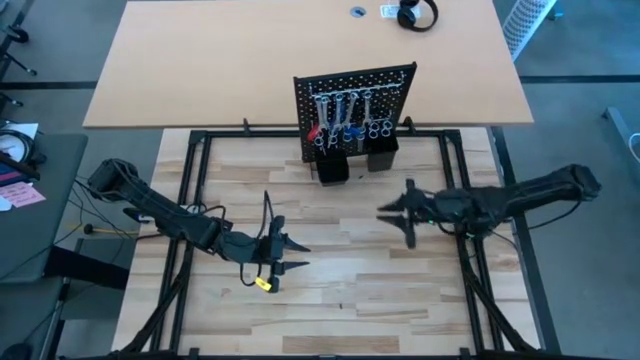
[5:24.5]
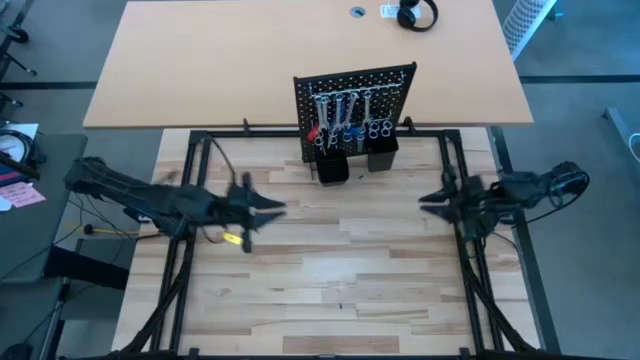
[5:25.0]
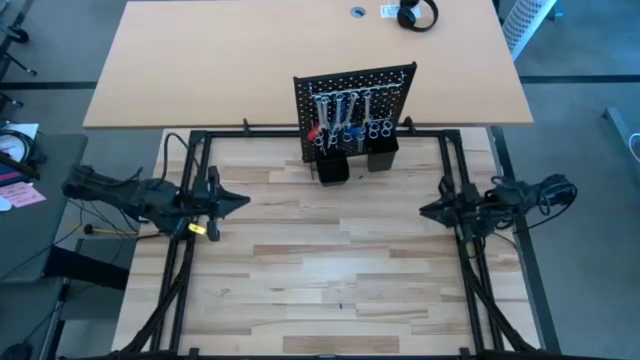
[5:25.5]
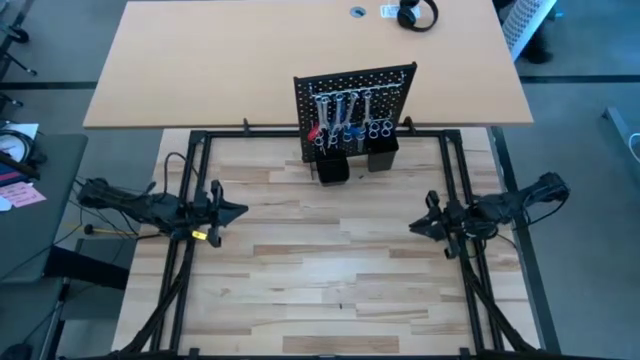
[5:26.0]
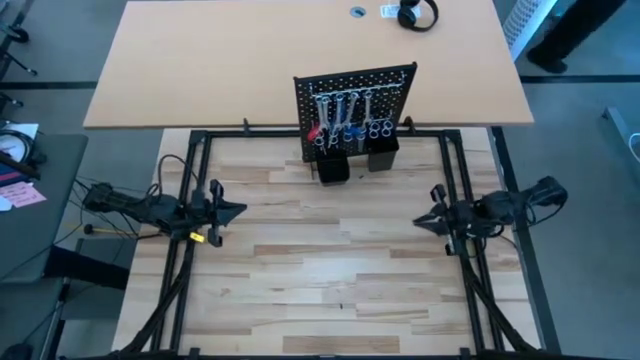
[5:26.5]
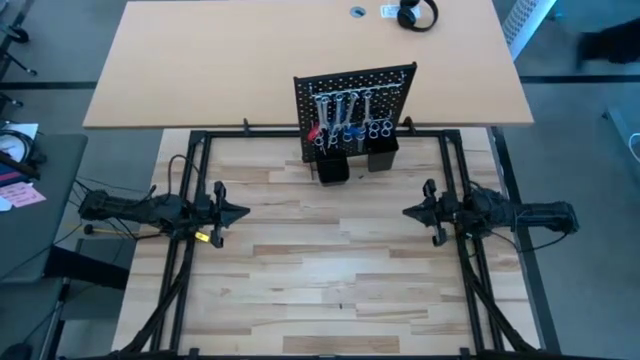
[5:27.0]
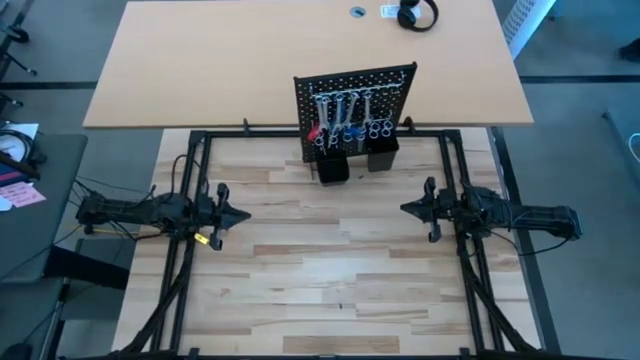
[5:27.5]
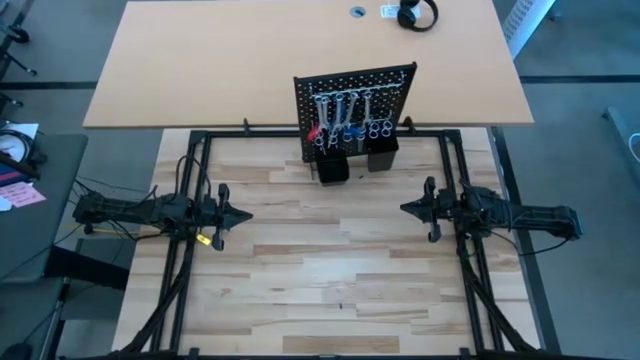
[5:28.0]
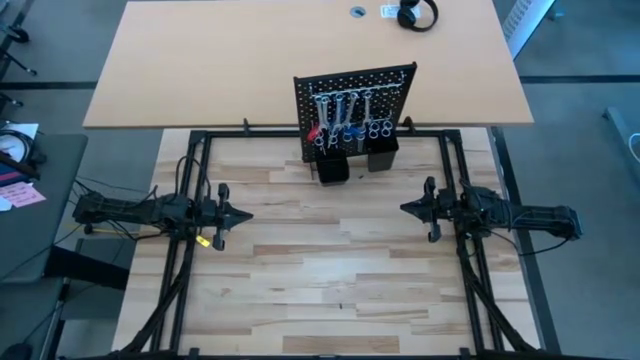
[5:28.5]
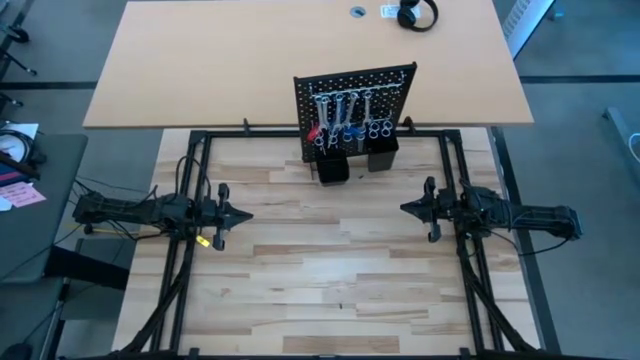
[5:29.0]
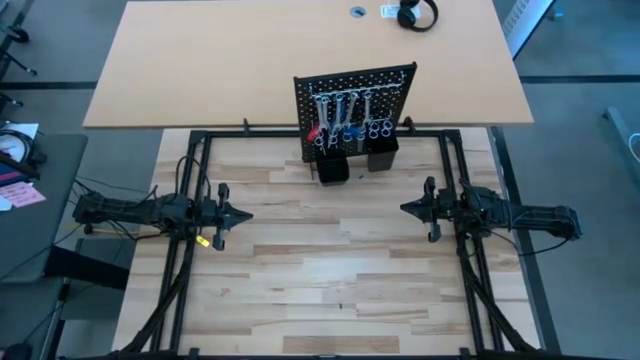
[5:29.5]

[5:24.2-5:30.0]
Task: Hang tools onto peg board
Return To Home Position

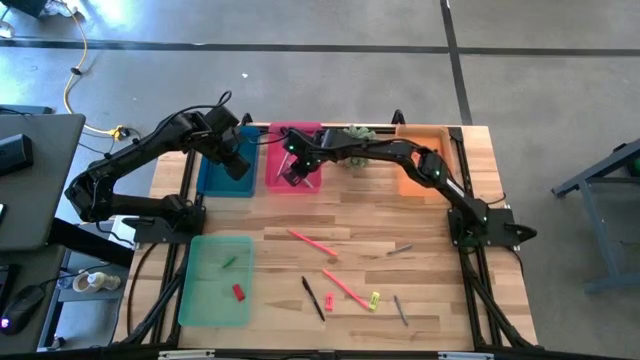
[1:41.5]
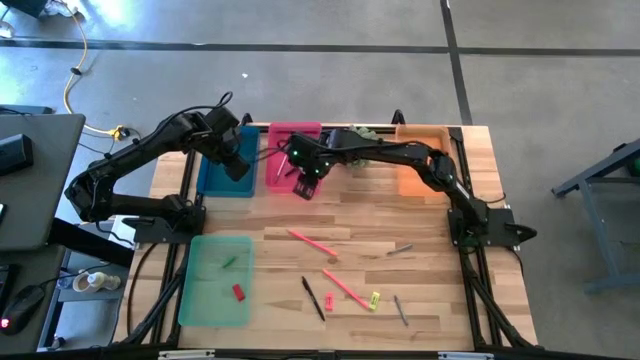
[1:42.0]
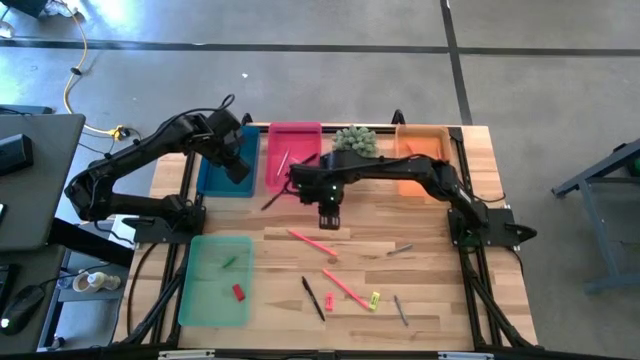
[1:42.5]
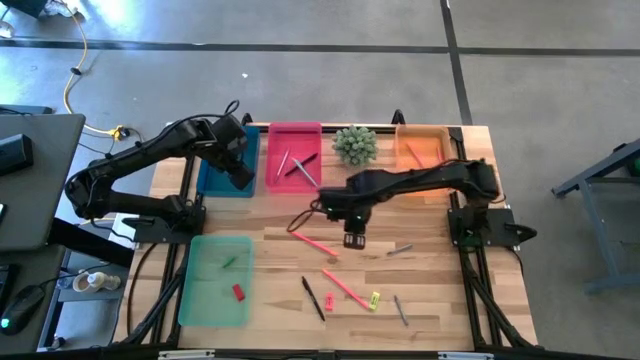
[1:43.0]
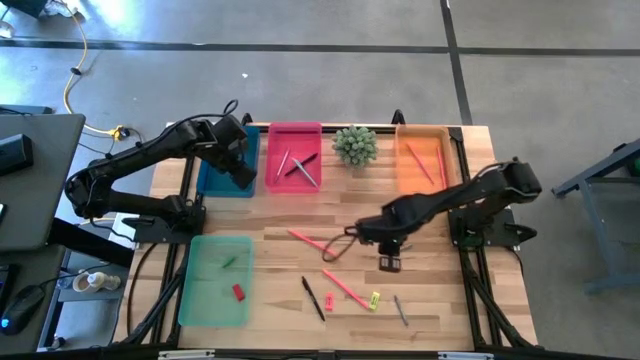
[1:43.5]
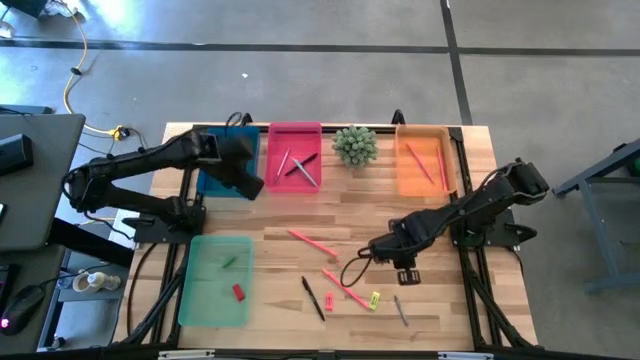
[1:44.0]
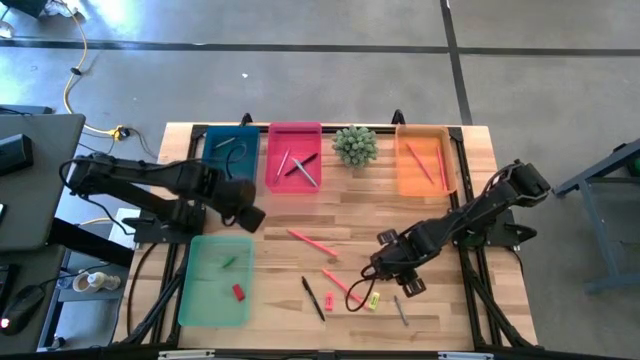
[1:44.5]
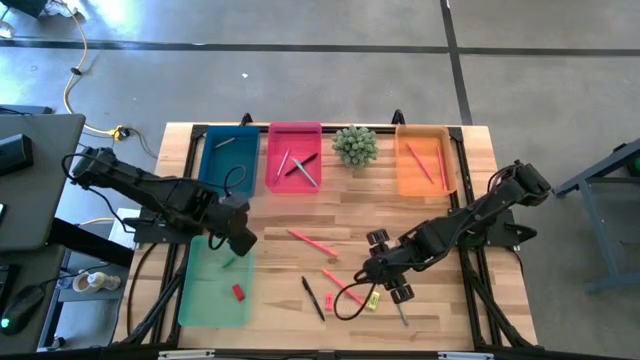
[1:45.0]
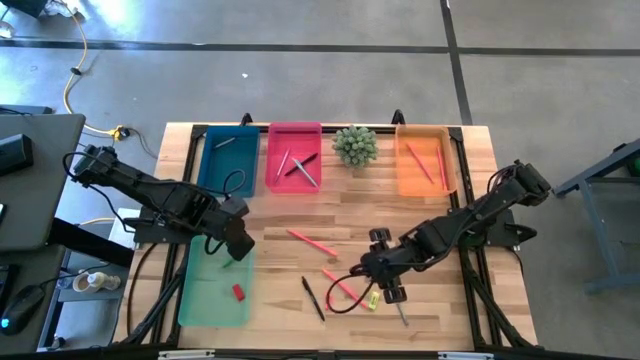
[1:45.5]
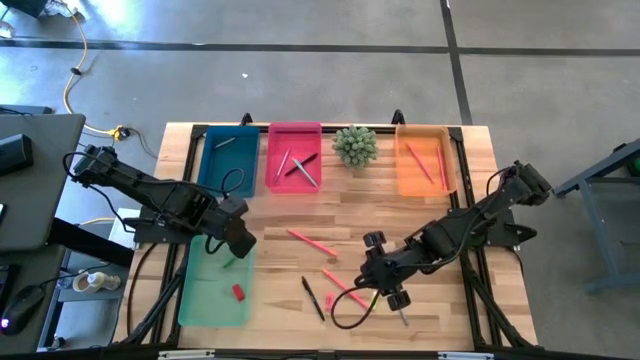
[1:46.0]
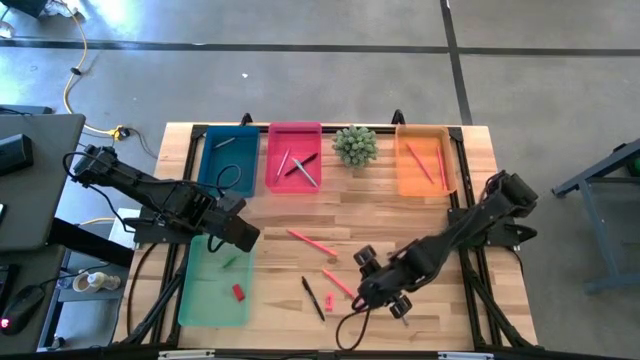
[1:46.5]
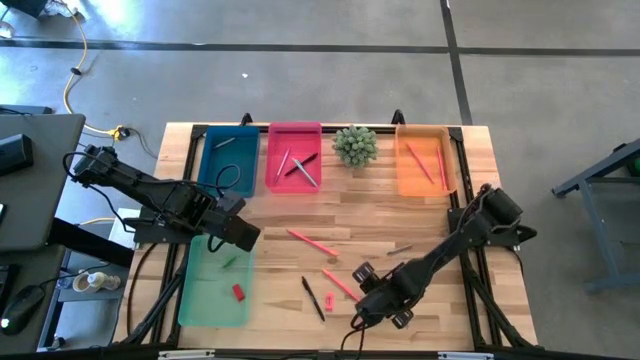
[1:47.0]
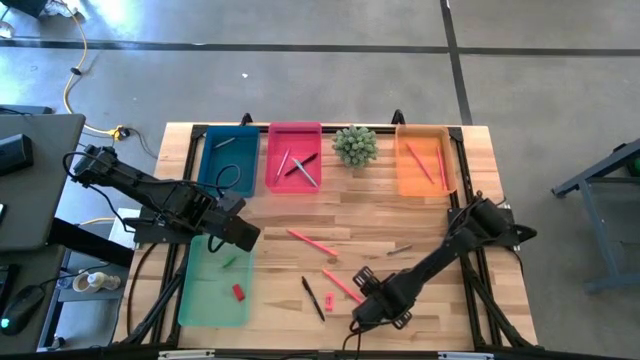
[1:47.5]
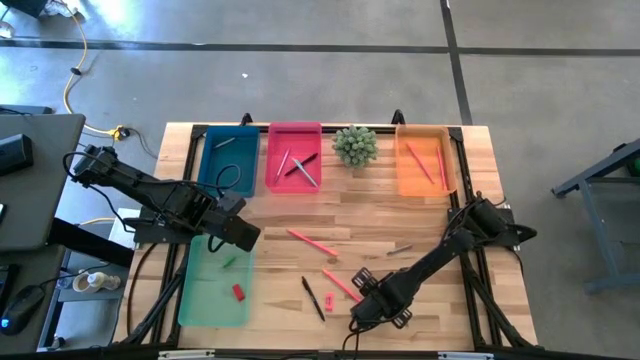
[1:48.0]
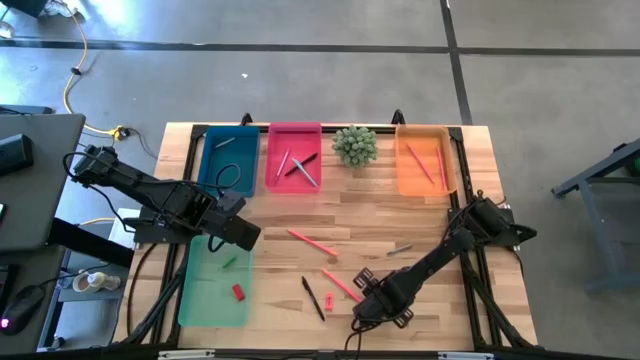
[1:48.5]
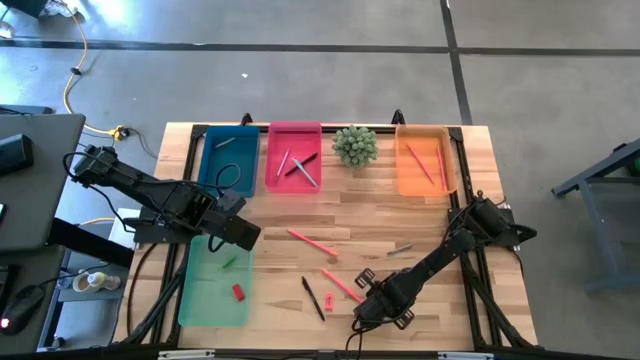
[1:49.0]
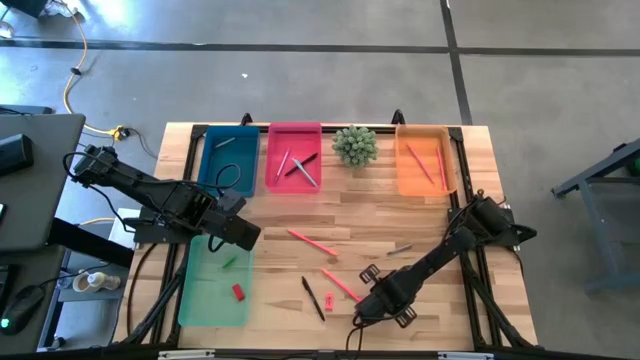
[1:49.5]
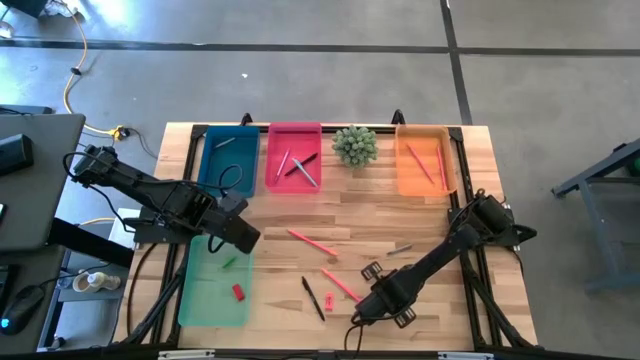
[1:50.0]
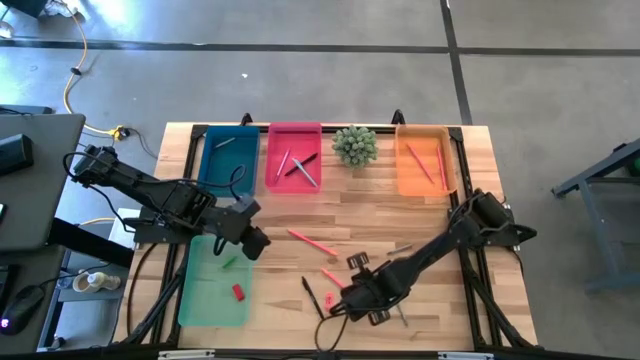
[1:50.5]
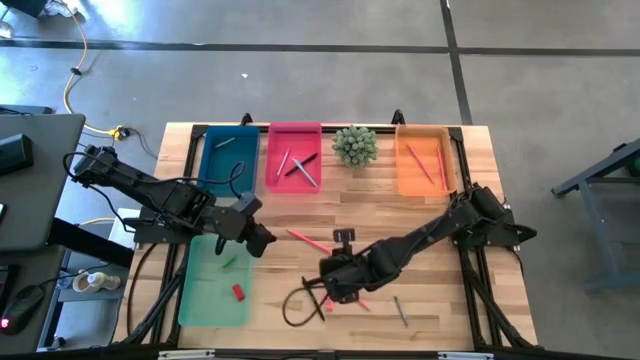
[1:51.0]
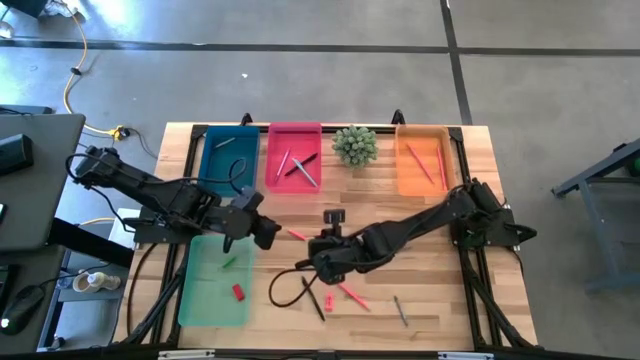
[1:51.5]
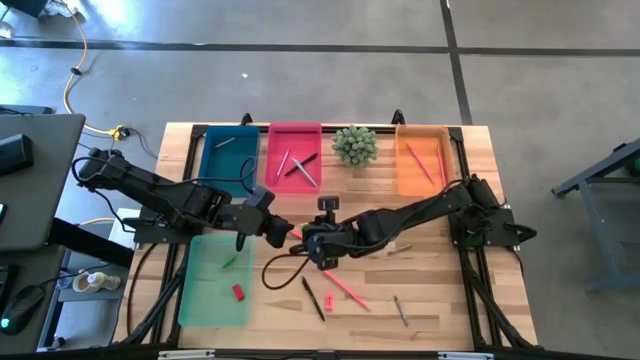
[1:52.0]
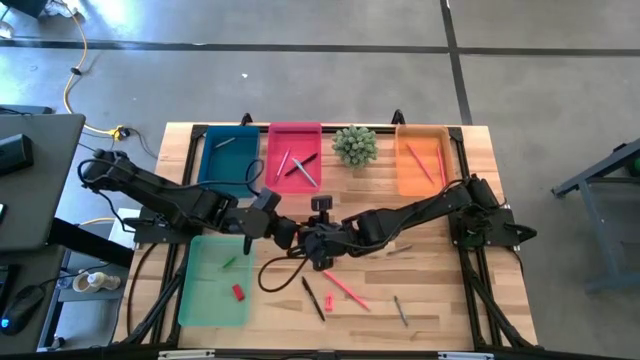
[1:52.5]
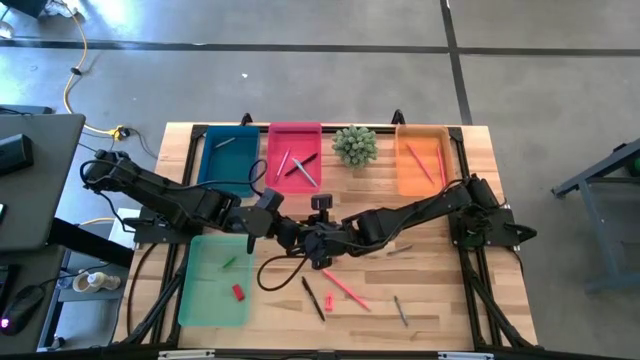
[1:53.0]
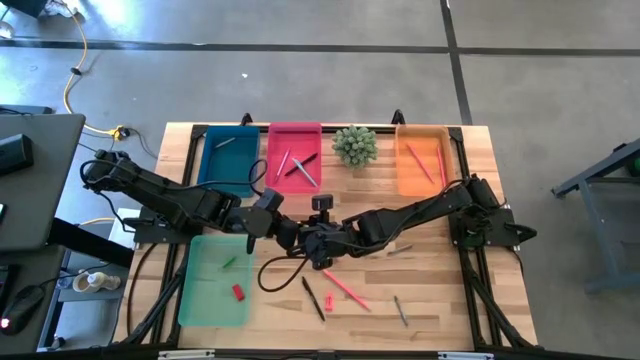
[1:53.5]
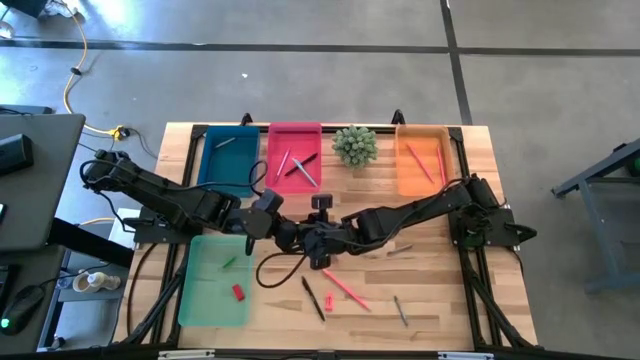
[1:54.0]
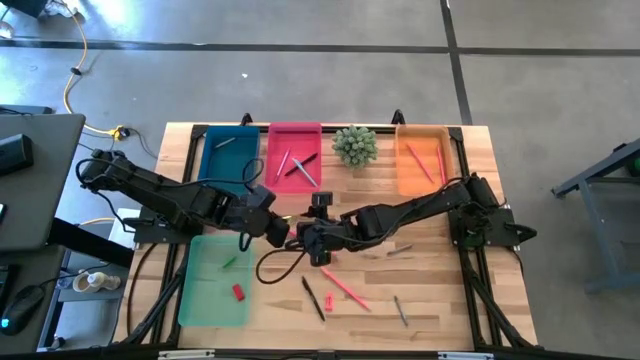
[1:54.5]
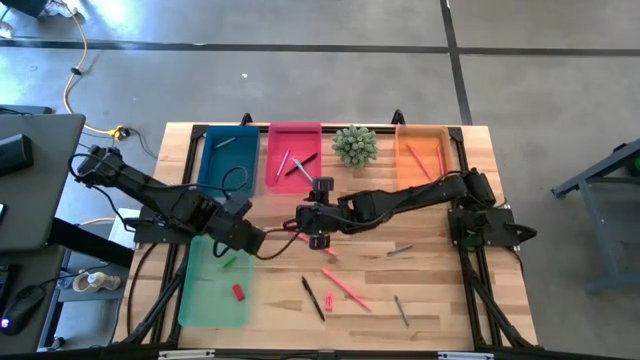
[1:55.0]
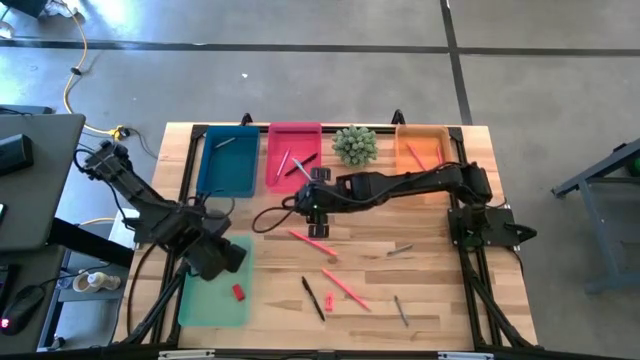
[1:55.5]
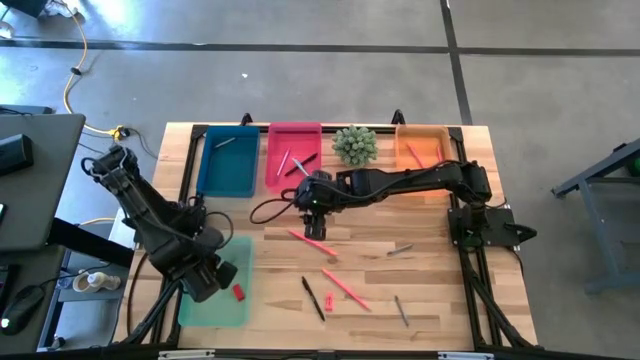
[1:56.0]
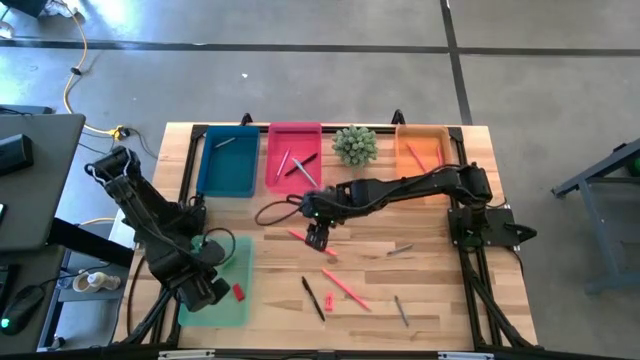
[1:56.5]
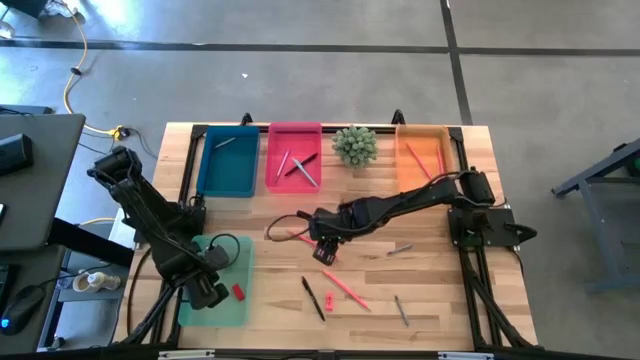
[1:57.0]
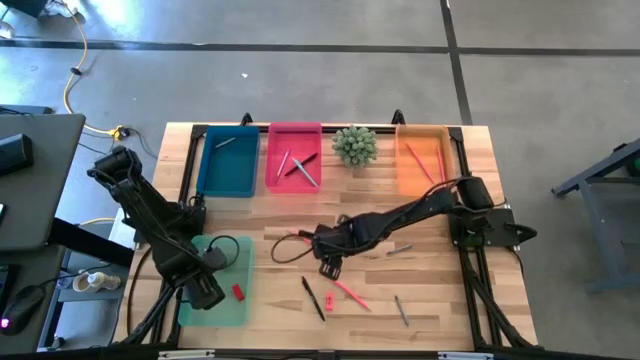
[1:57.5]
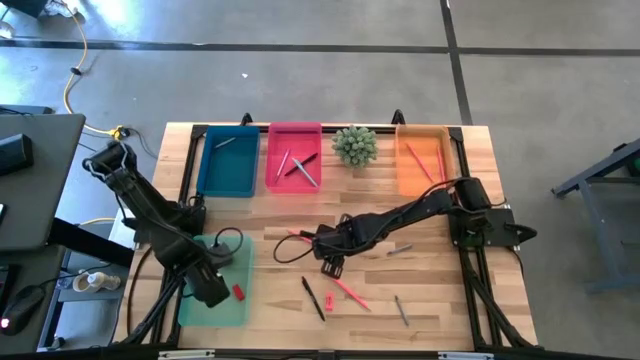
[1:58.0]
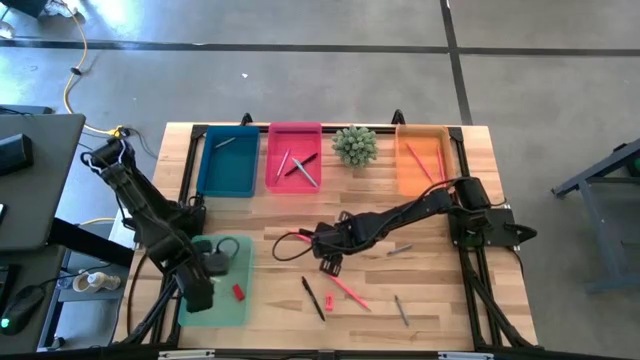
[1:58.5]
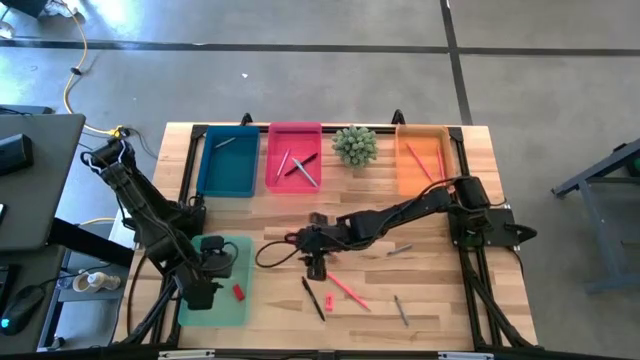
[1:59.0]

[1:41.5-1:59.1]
Task: Sort crayons/erasers/pens/pencils in bins
Put the yellow eraser into the green bin
